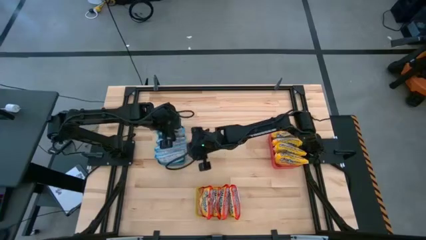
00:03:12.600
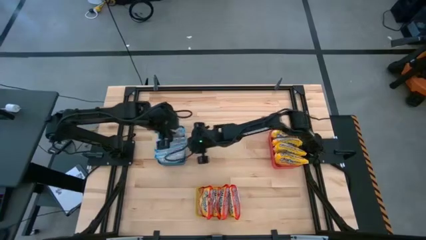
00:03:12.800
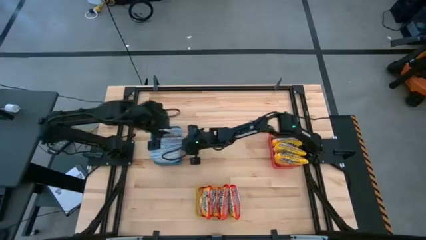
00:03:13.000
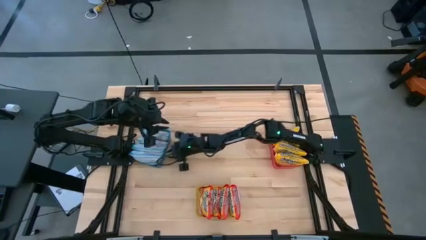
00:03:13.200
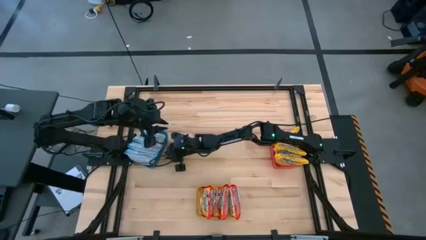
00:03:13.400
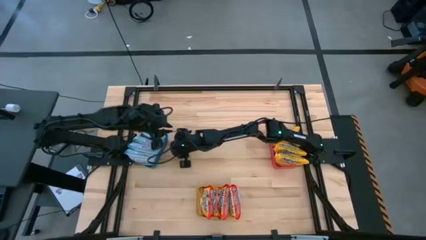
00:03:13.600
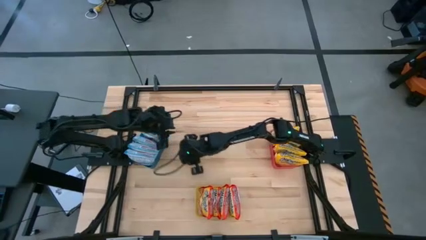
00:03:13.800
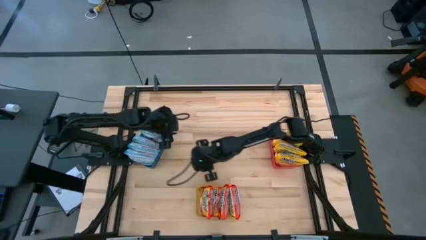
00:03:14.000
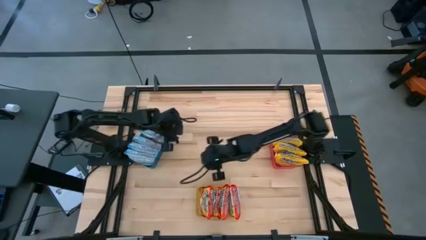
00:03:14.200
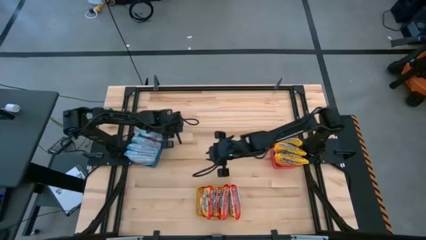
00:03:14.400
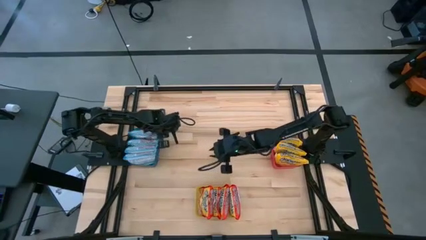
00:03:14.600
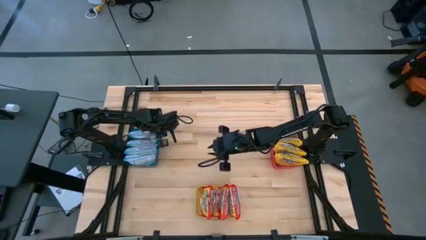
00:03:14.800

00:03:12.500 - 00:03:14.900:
Task: Sort Maruchan noodles
Adjust the blue bin on the table

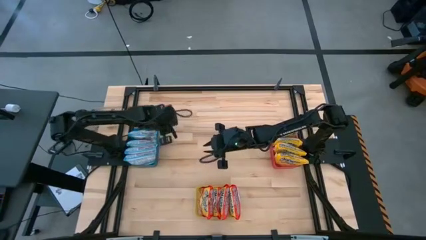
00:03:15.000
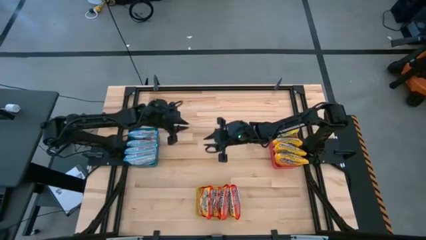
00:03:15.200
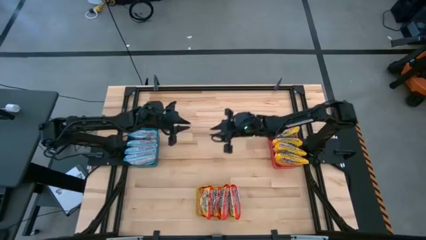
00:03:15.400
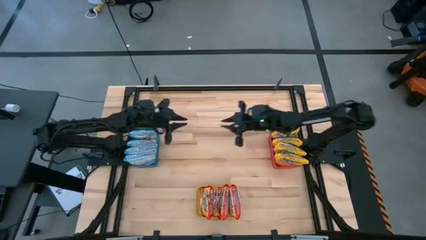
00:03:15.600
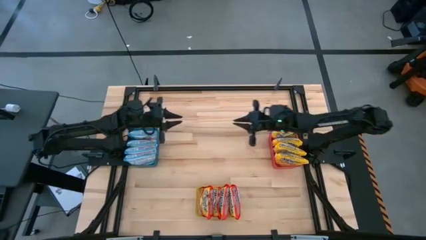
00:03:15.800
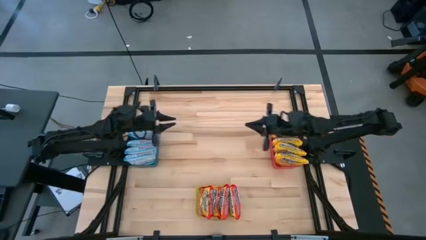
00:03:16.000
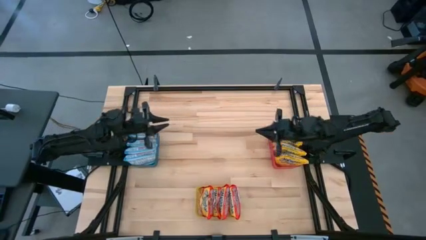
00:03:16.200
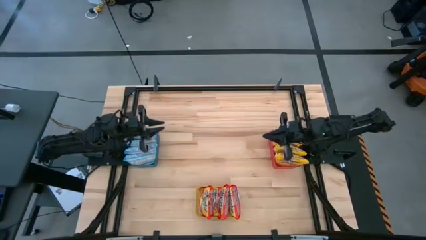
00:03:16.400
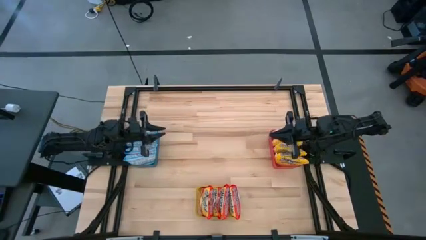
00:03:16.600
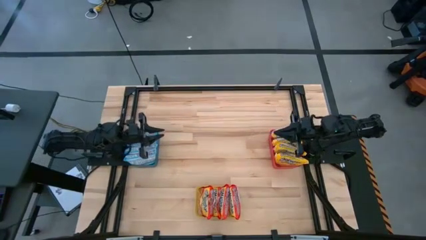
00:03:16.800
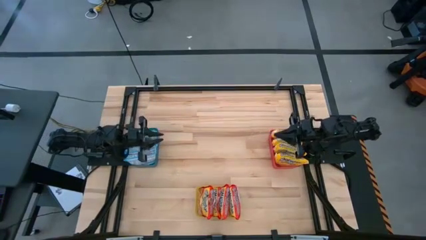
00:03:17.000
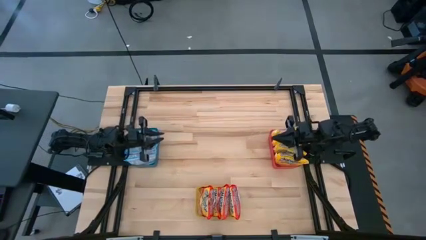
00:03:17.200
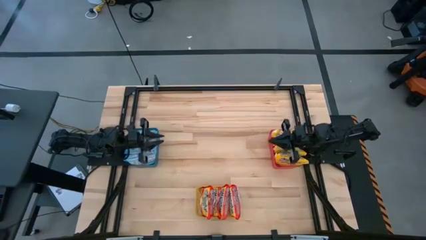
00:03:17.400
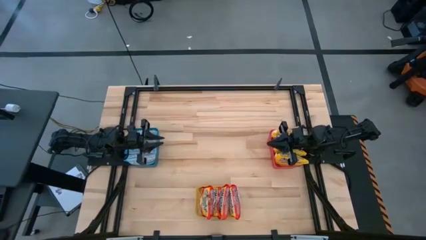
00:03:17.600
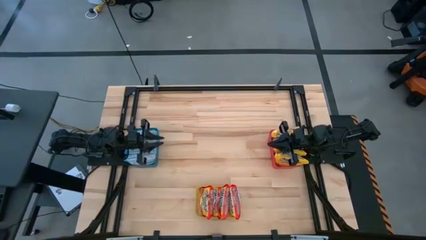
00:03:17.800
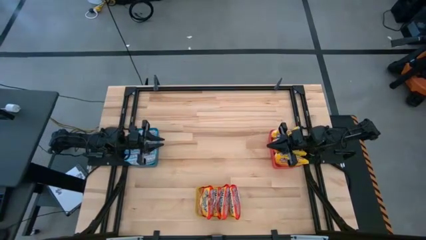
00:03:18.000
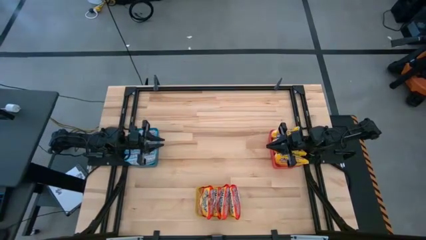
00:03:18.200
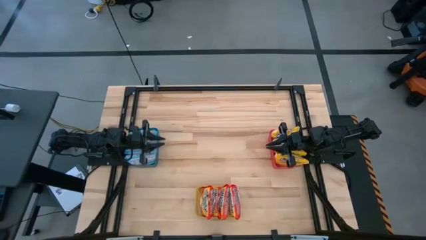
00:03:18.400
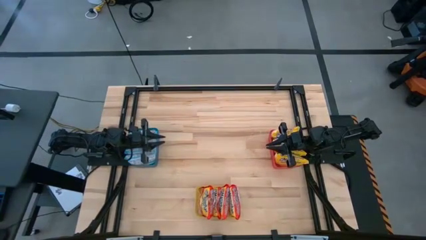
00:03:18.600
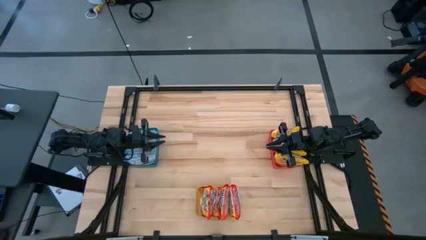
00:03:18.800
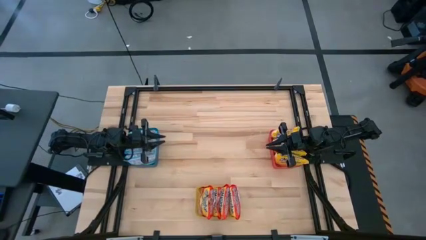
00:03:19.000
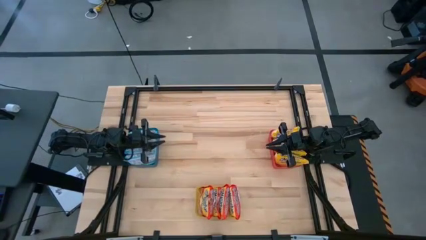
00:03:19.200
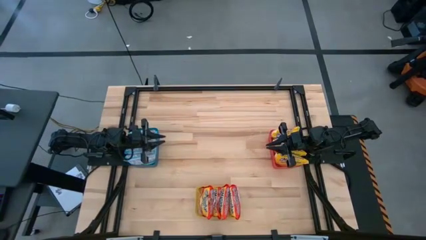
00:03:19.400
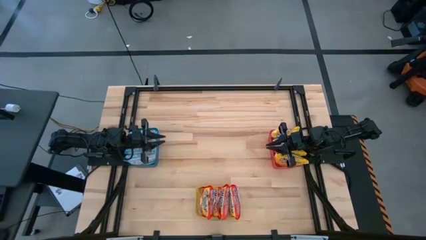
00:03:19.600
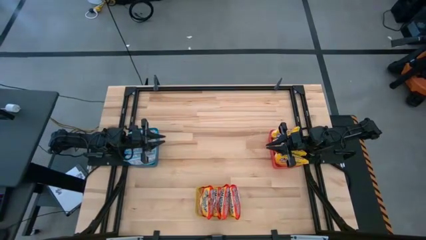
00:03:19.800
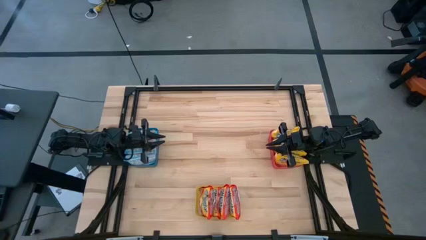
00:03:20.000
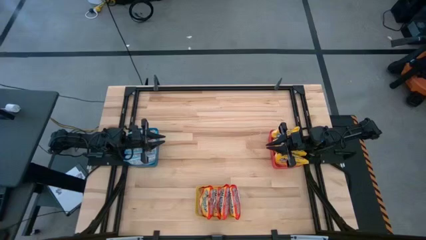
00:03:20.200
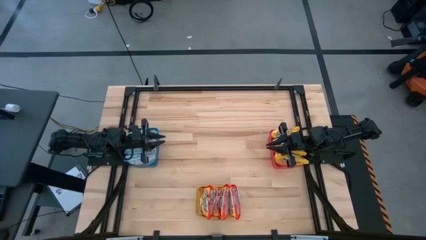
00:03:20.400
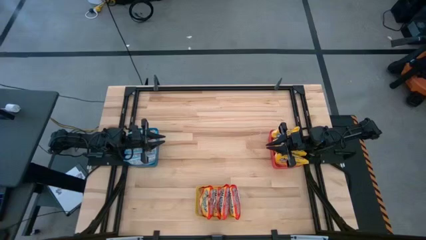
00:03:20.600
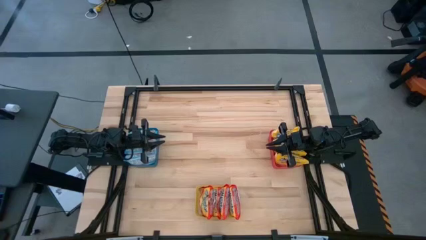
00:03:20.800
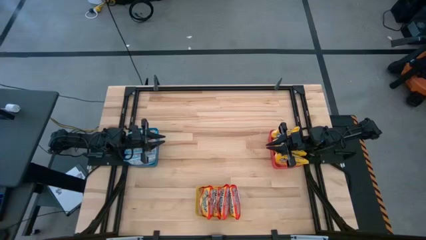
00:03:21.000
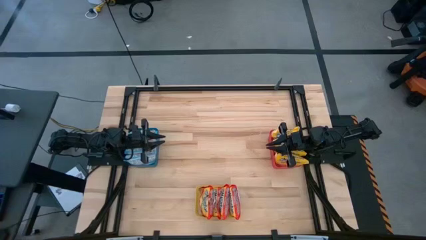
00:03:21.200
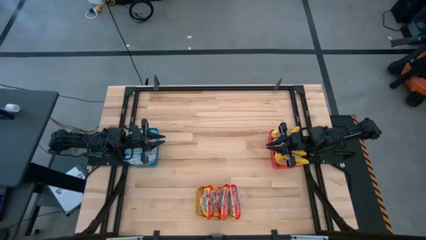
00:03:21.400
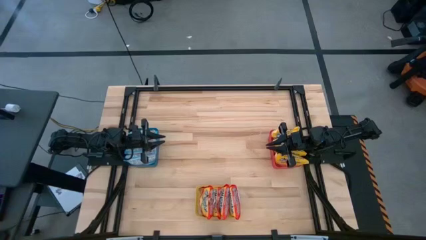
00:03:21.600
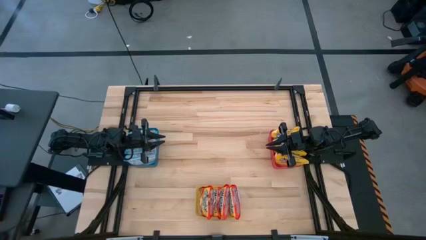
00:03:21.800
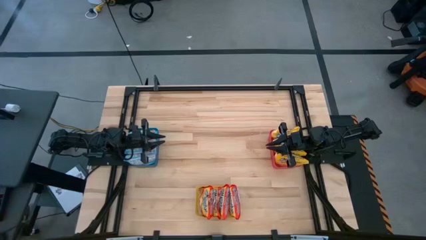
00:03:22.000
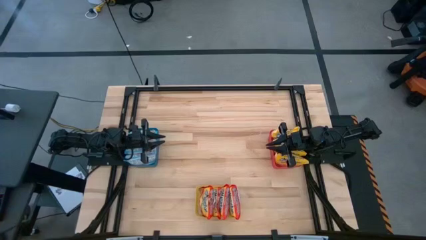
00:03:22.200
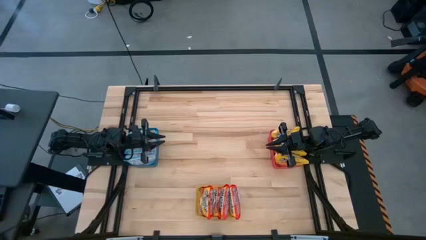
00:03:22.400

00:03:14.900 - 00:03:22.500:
Return to Home Position

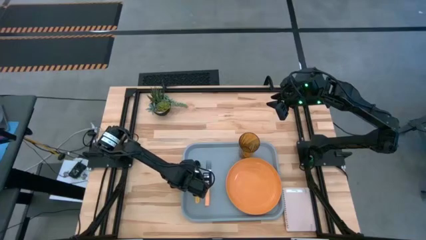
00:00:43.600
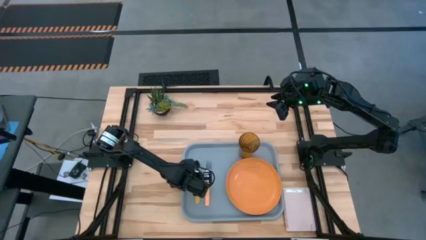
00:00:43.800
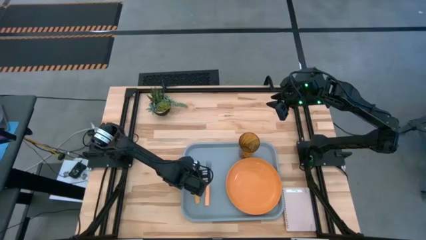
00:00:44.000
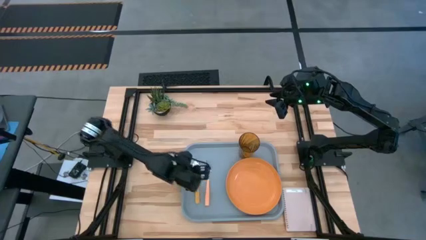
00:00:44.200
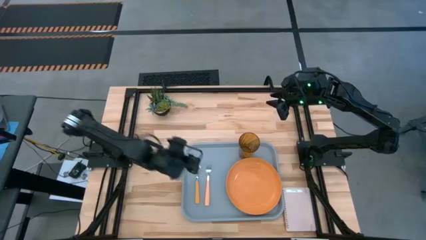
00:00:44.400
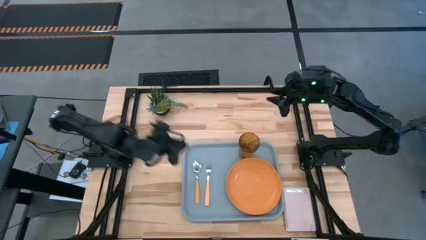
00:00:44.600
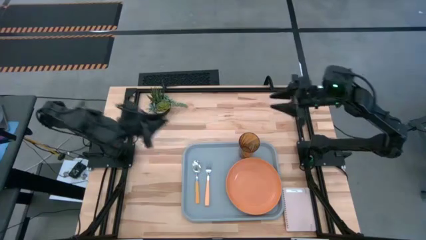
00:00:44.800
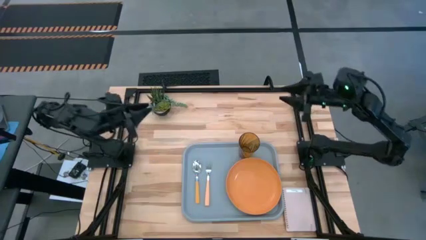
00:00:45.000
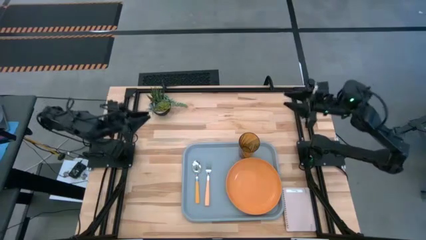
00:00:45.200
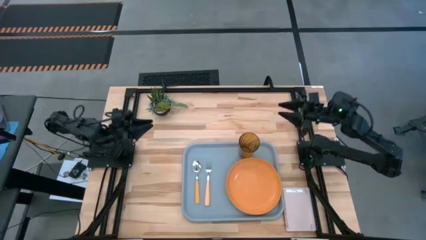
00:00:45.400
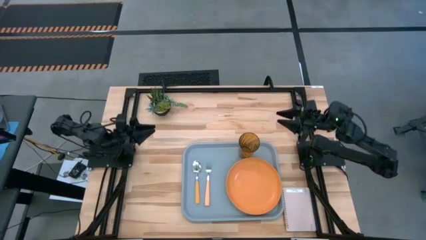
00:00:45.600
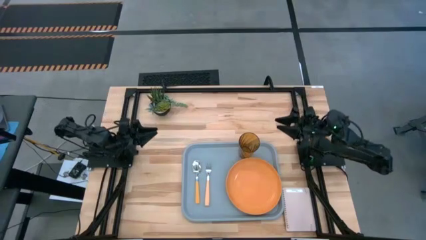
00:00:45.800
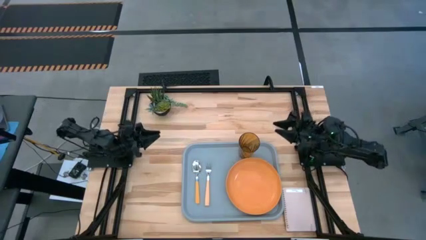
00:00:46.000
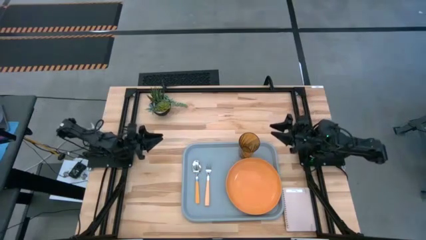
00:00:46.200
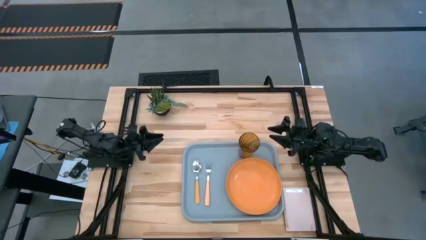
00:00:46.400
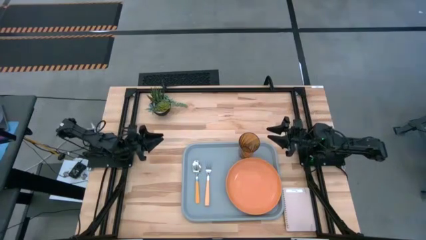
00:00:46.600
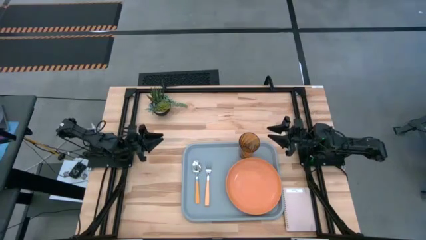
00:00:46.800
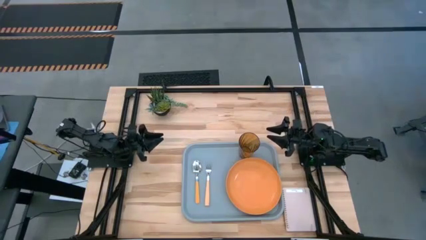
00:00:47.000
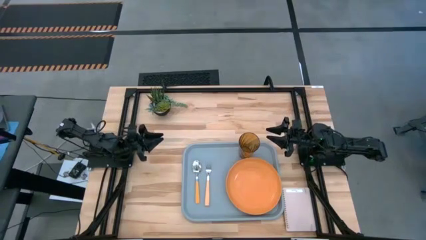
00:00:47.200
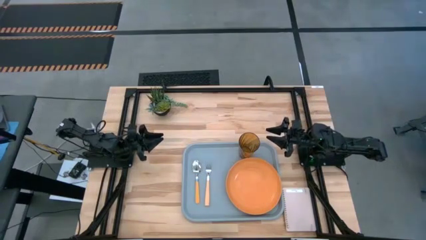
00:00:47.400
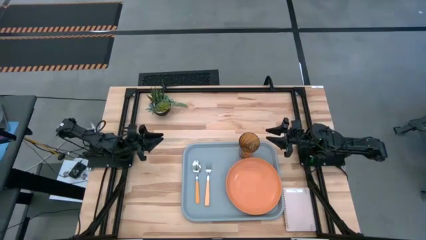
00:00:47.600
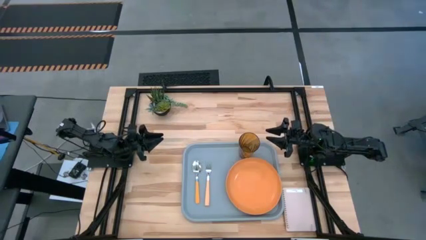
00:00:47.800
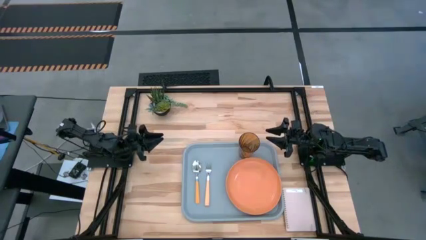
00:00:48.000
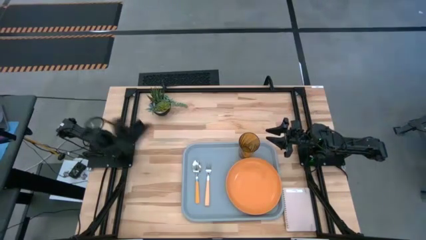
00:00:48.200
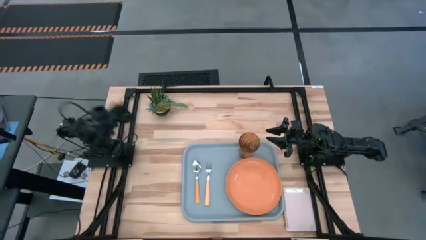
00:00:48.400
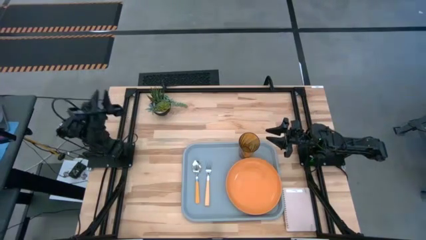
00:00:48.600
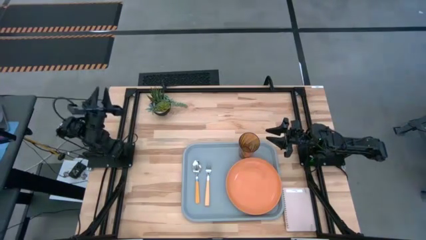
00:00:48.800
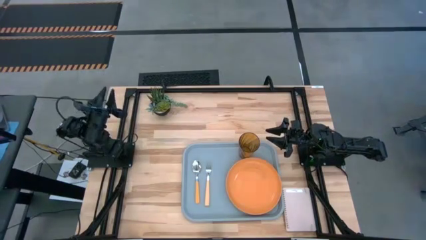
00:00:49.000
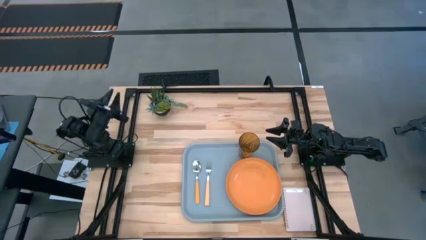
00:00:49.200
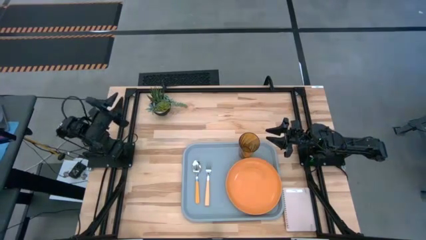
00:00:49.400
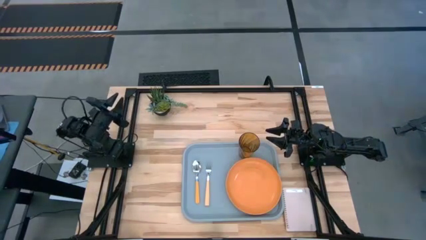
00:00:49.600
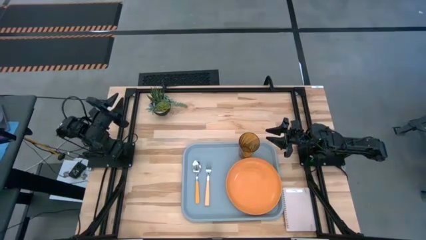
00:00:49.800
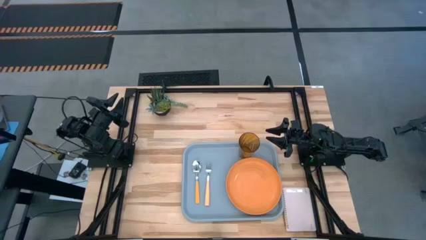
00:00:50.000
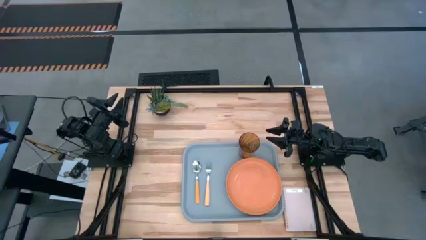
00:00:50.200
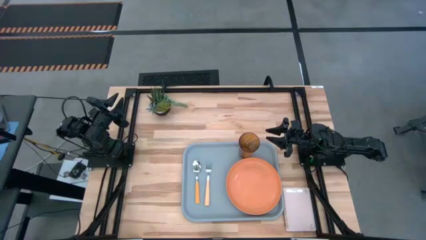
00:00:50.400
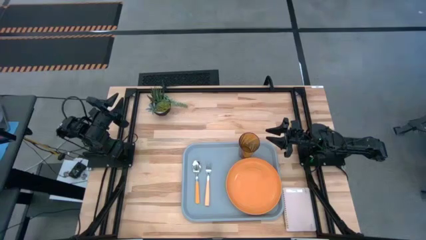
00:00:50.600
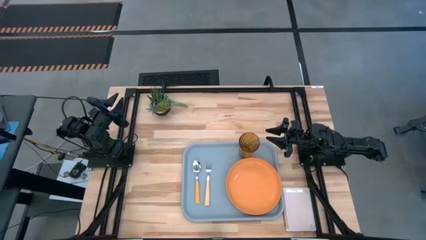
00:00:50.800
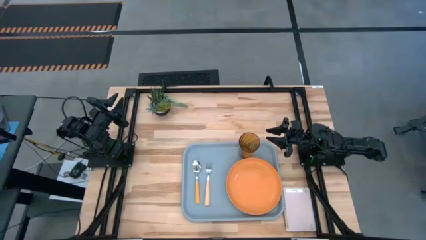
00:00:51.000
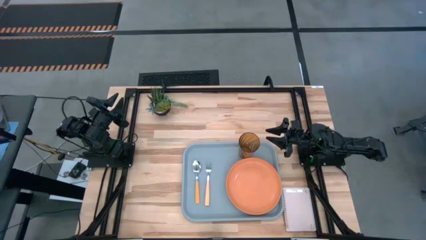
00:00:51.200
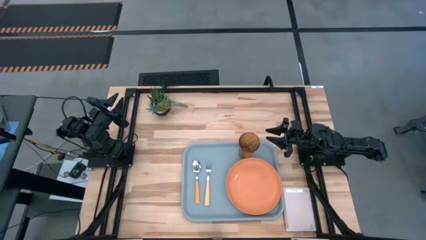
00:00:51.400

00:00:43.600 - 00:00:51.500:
Task: Pick and place plate/cup/fork/spoon on tray
Return to Home Position
